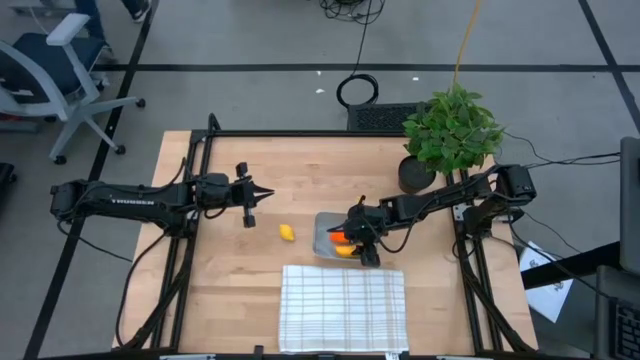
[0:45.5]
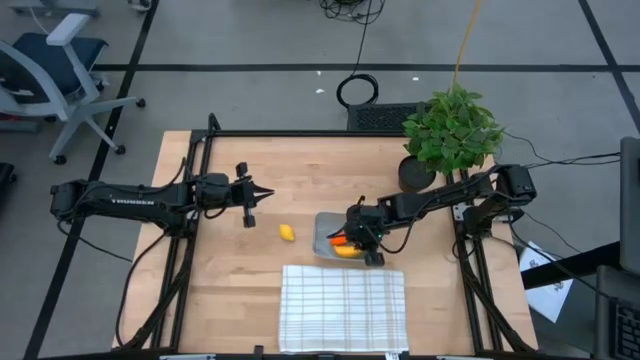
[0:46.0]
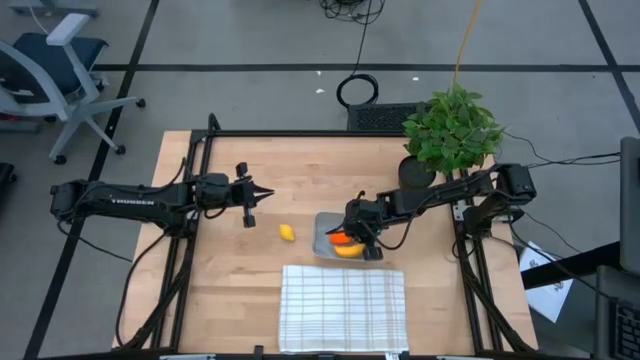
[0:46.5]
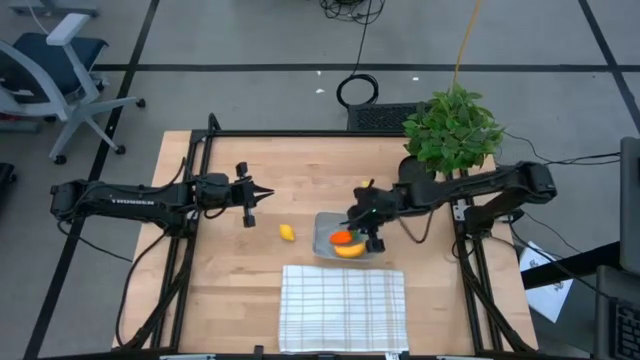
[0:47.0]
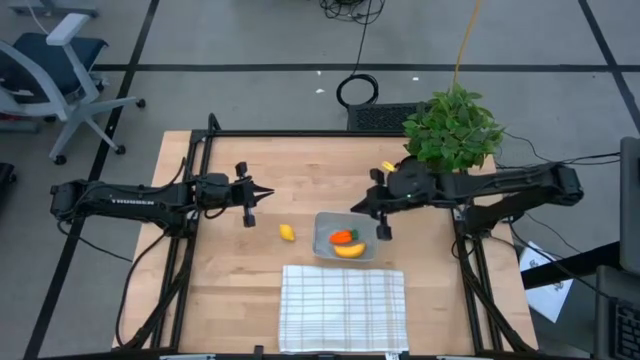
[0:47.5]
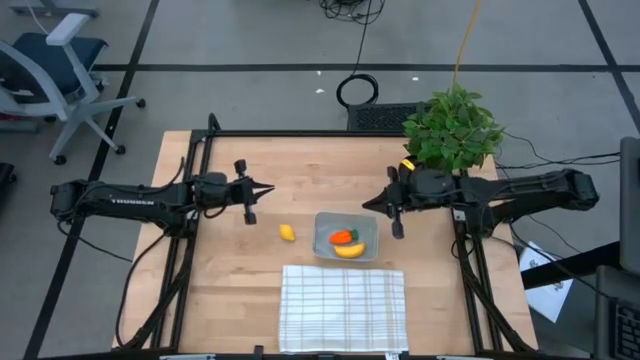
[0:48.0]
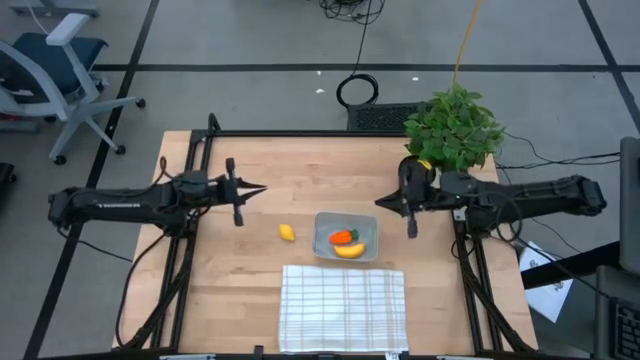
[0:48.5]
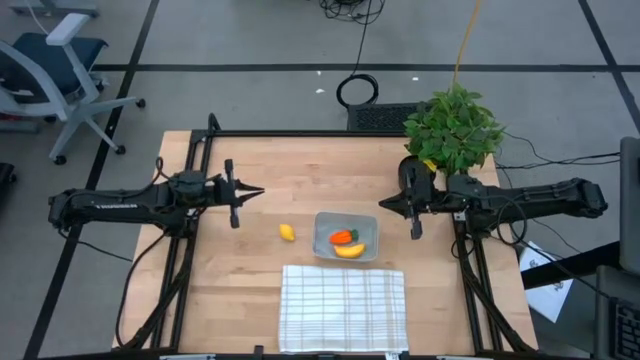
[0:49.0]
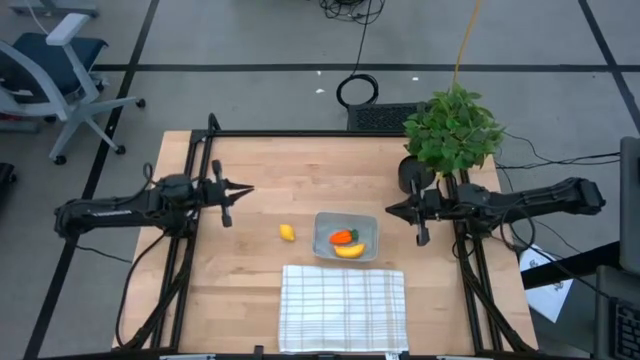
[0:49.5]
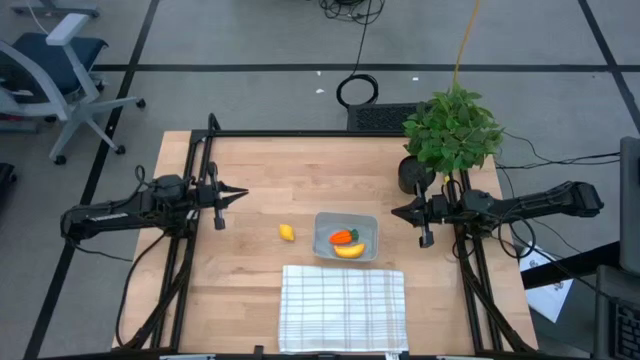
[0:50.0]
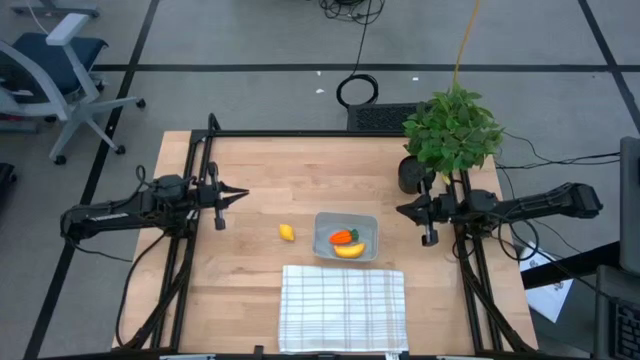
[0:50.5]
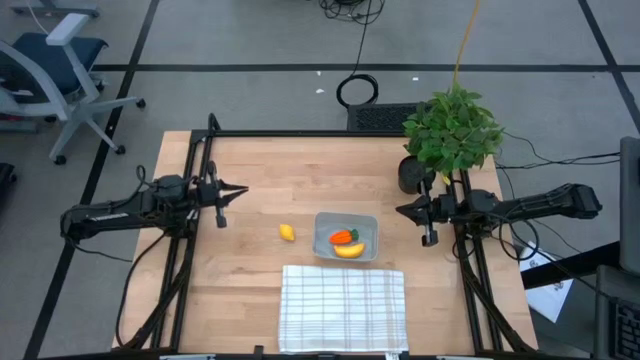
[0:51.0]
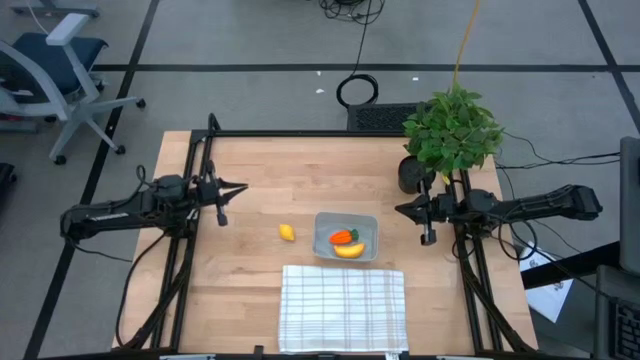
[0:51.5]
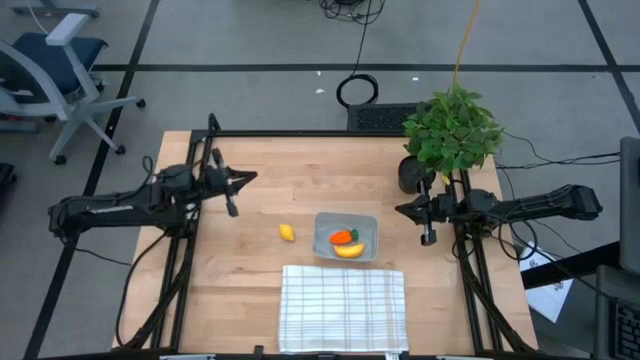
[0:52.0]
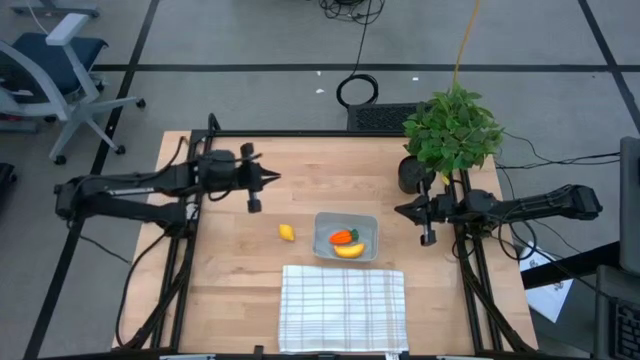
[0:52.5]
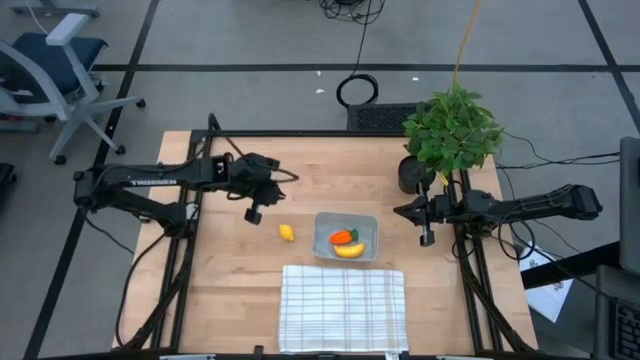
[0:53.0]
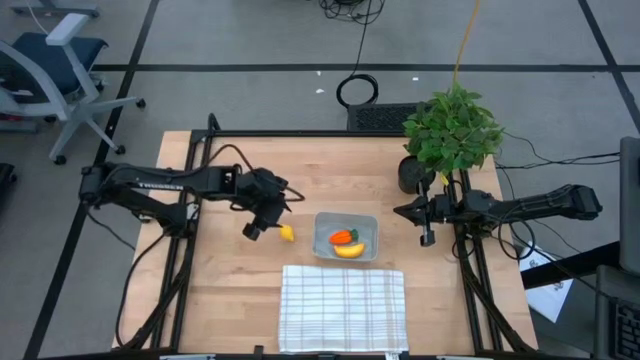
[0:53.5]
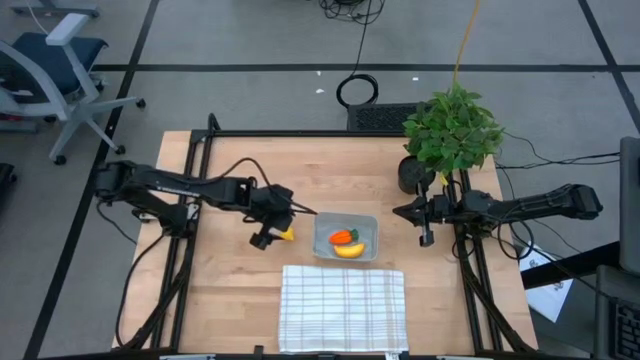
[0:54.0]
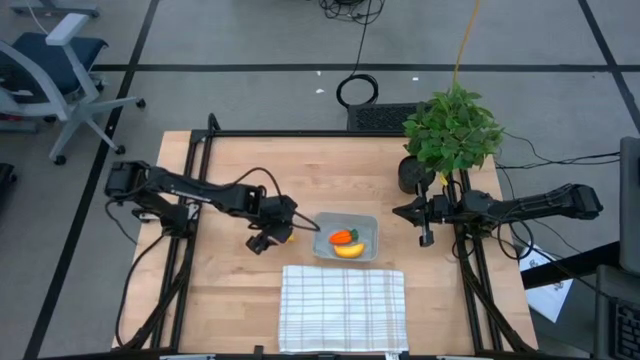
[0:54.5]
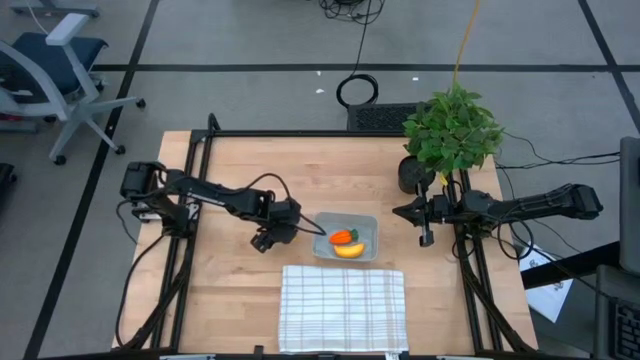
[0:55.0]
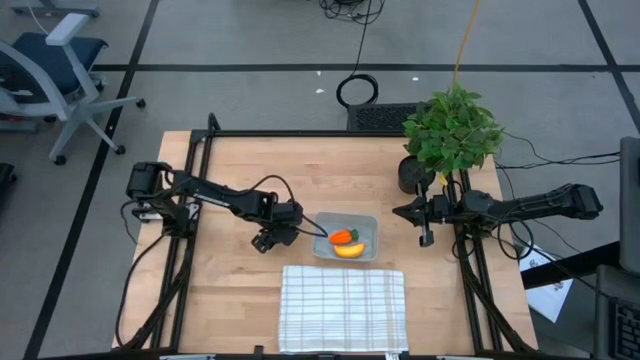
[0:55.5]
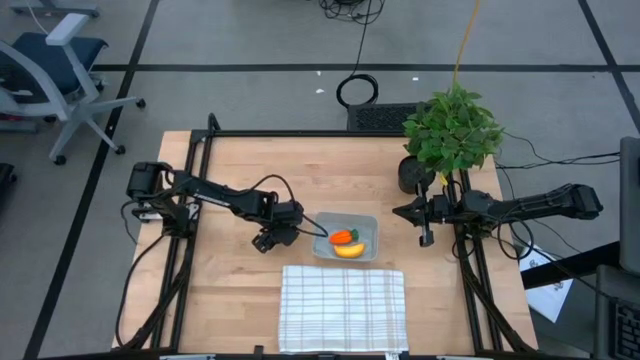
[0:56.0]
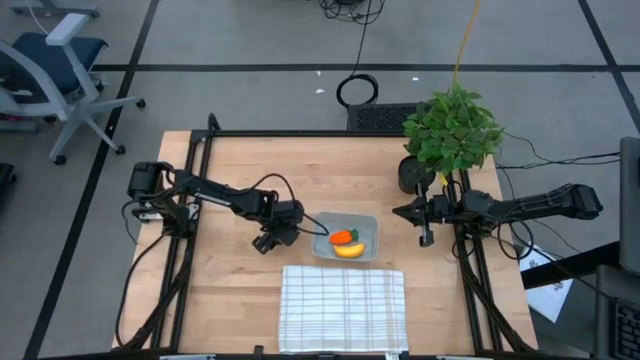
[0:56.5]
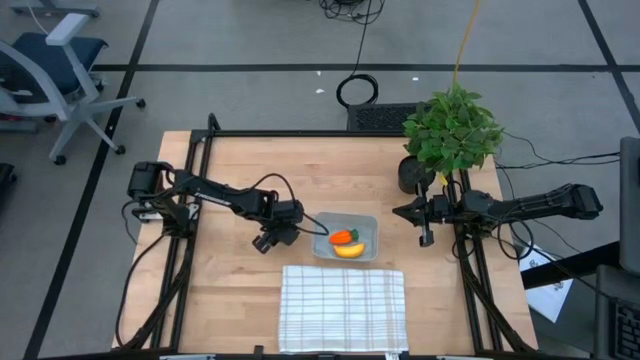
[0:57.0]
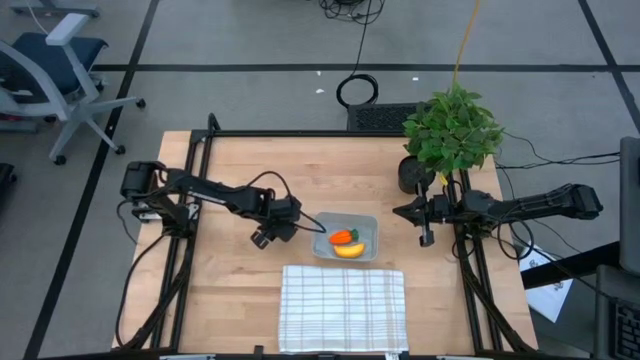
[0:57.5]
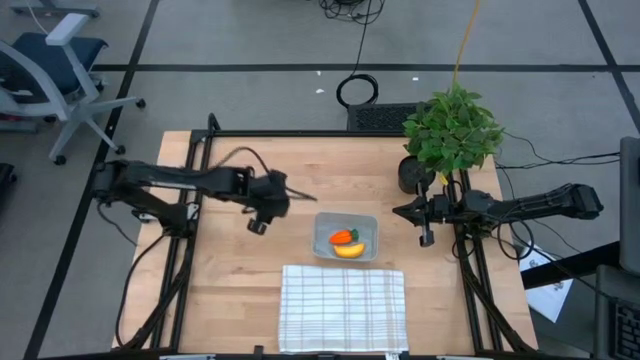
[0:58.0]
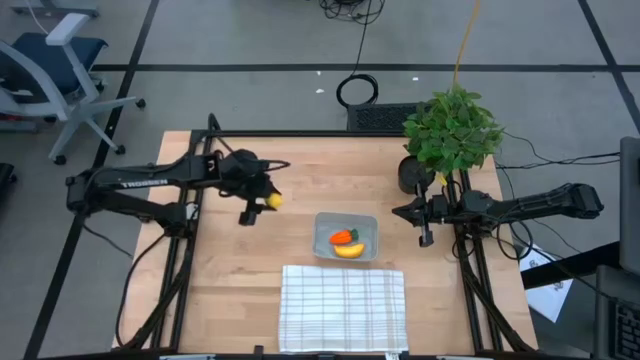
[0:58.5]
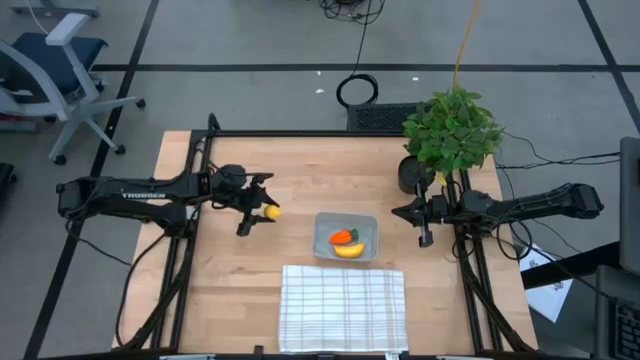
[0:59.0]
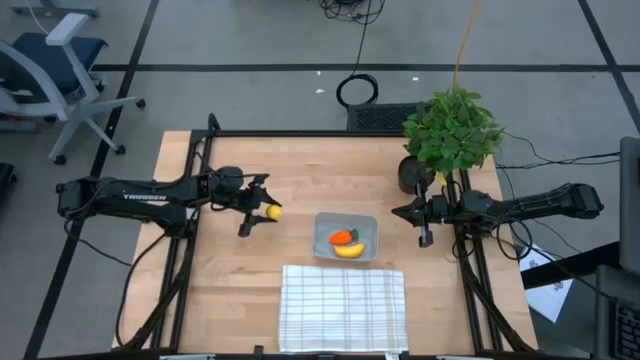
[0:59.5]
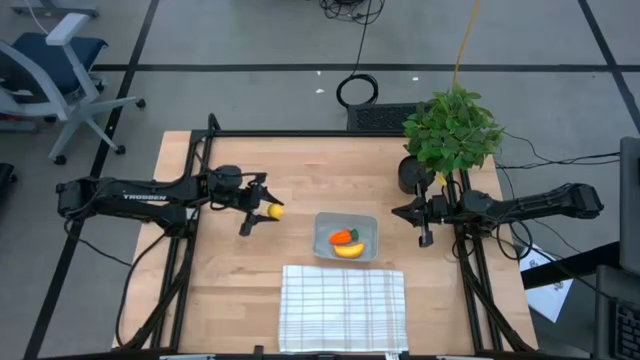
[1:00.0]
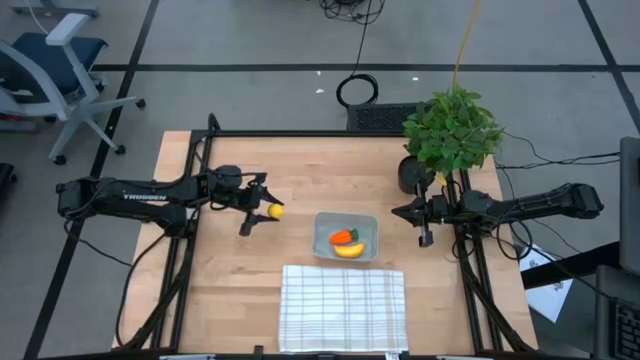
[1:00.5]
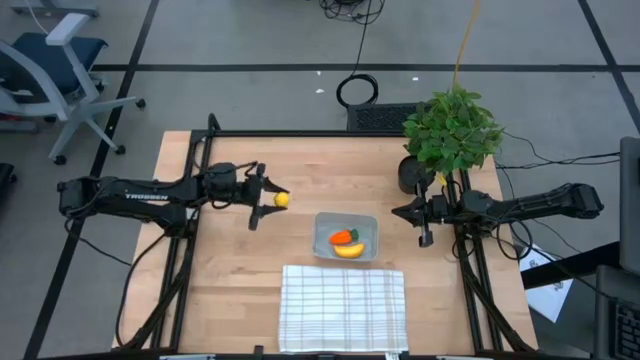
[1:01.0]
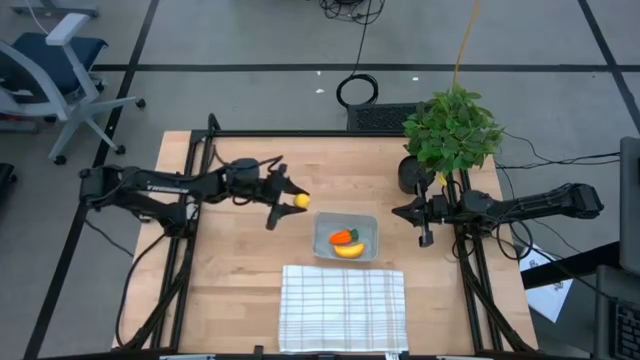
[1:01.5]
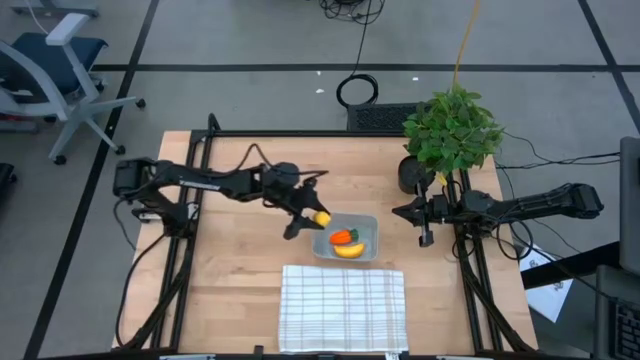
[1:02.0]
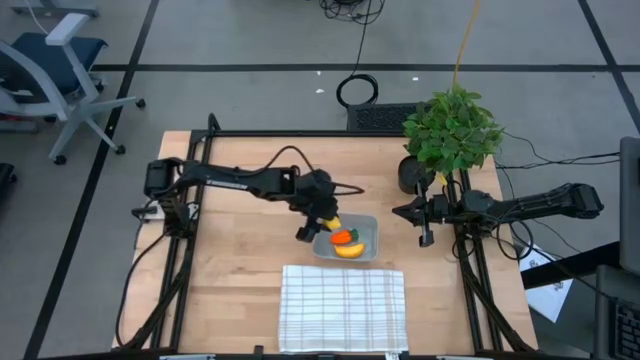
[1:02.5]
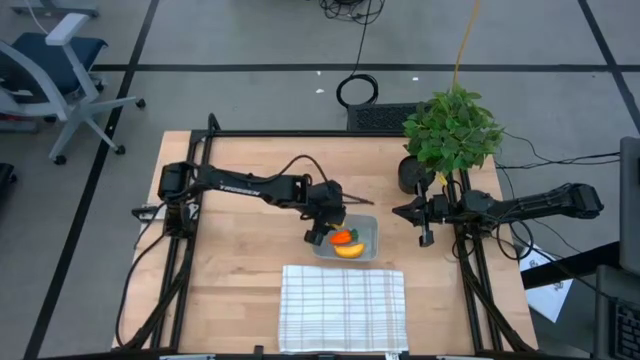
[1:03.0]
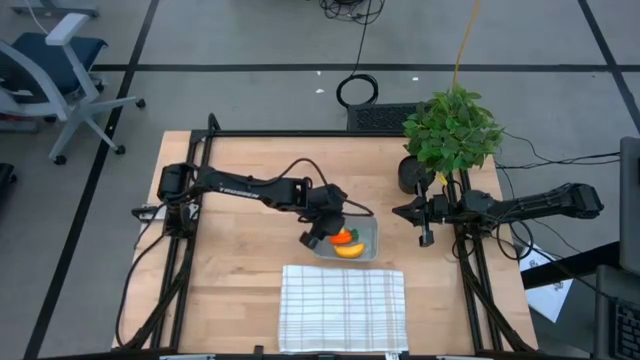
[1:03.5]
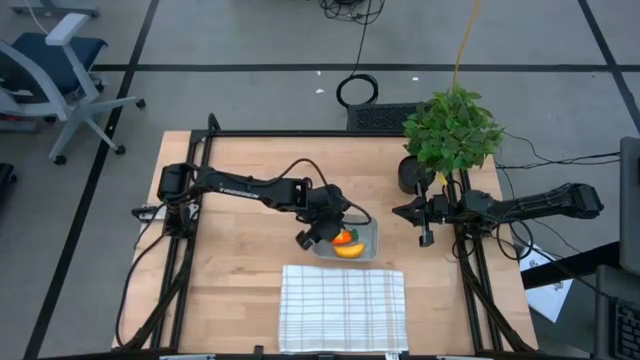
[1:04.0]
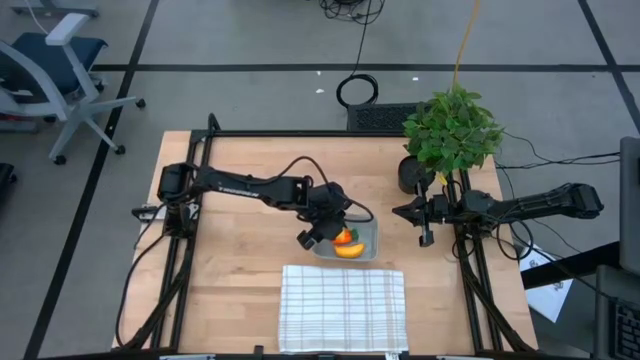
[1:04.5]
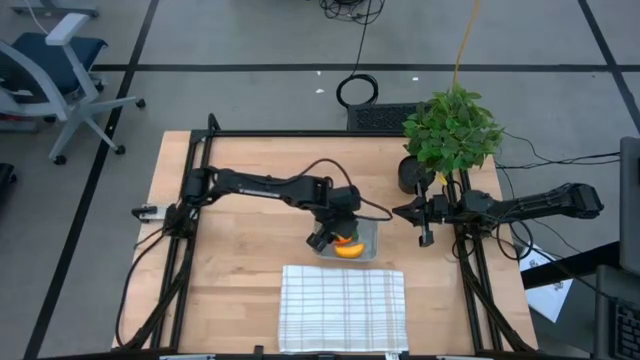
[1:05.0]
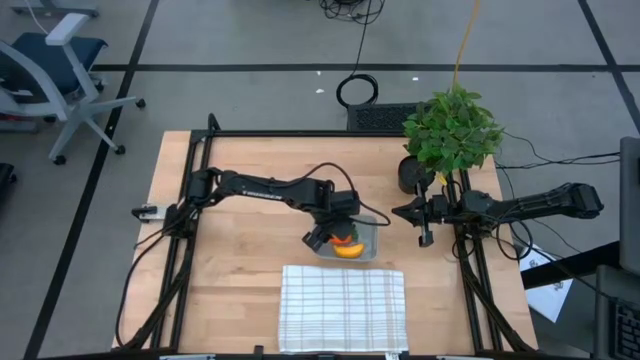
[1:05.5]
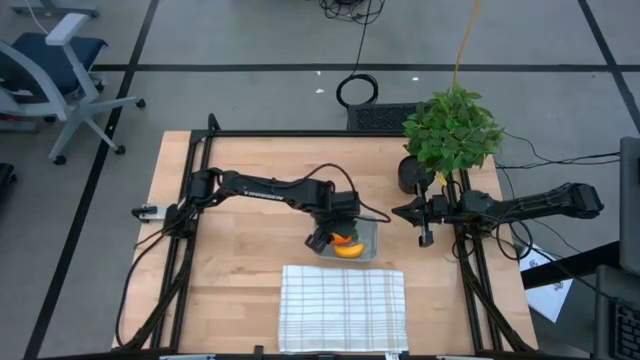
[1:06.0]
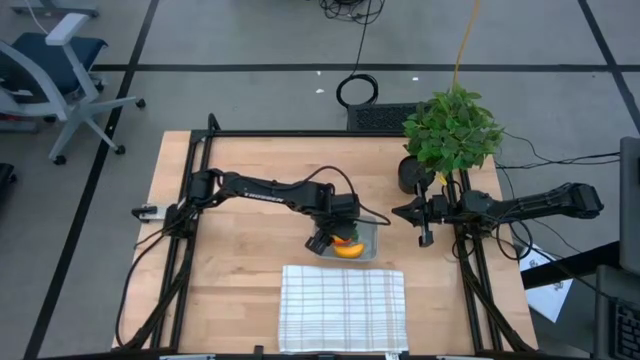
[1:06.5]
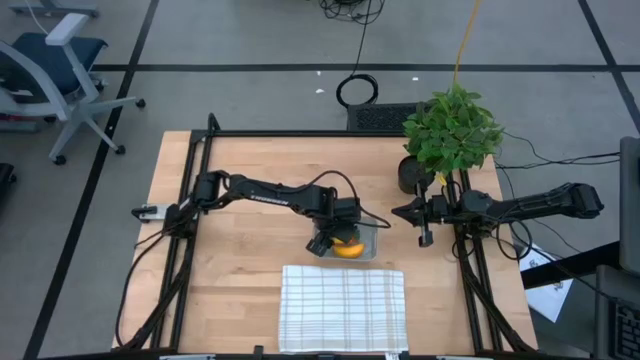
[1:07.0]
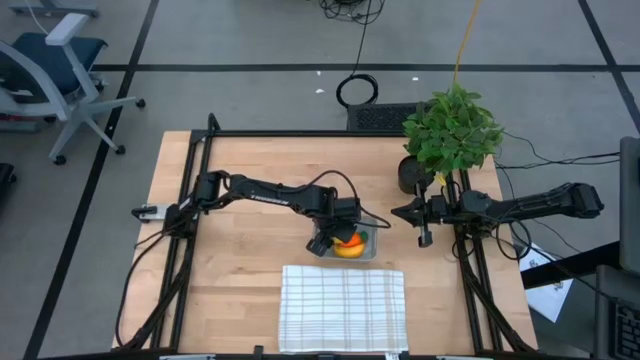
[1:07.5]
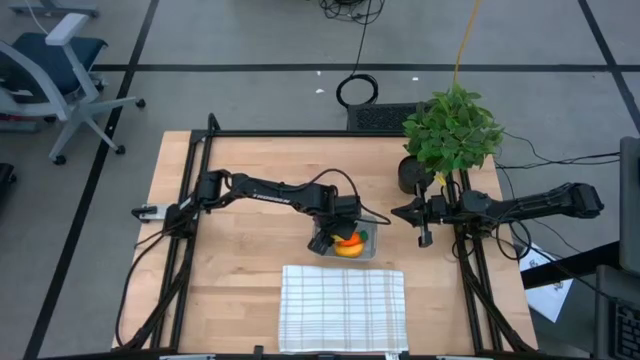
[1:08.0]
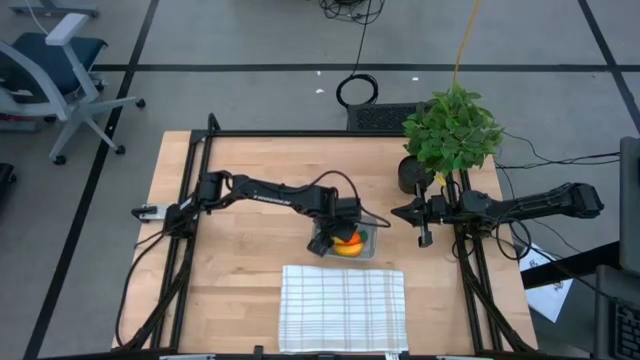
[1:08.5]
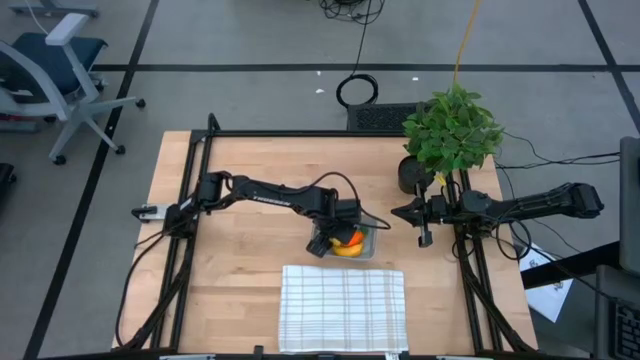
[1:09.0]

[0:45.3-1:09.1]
Task: Pick and placing Produce into tupperware
Put the lemon into the gray bin
